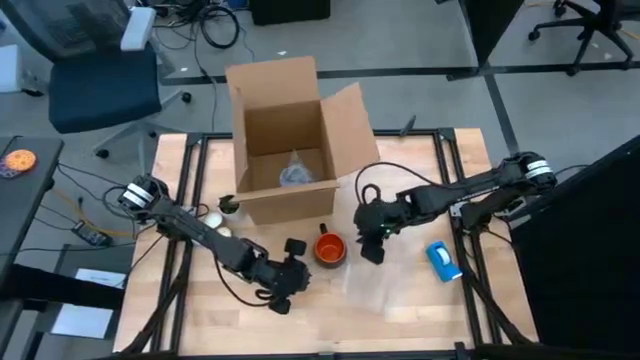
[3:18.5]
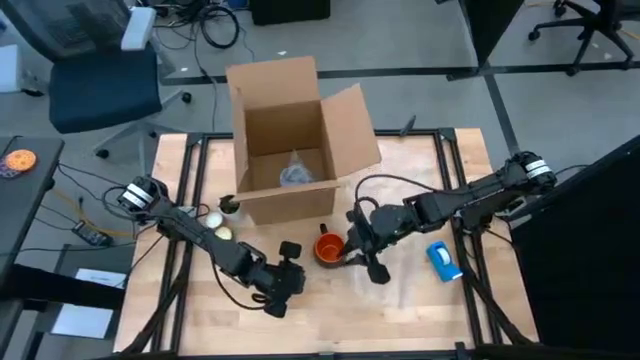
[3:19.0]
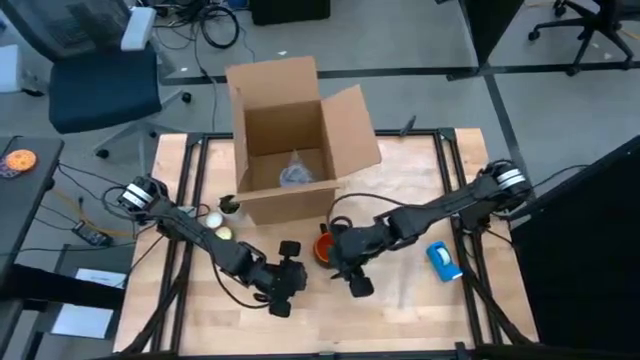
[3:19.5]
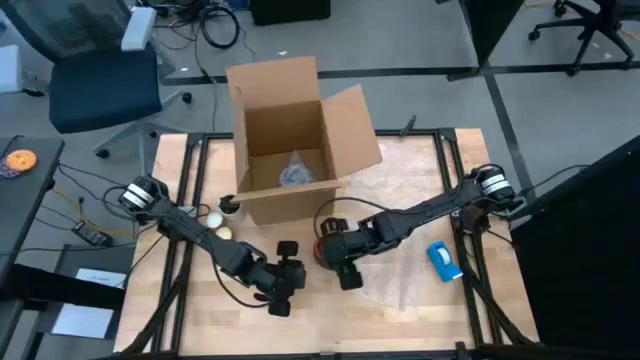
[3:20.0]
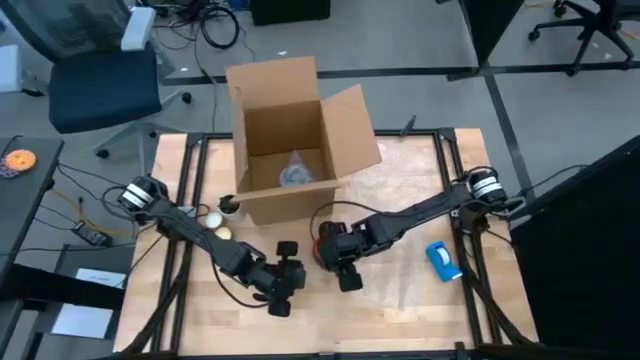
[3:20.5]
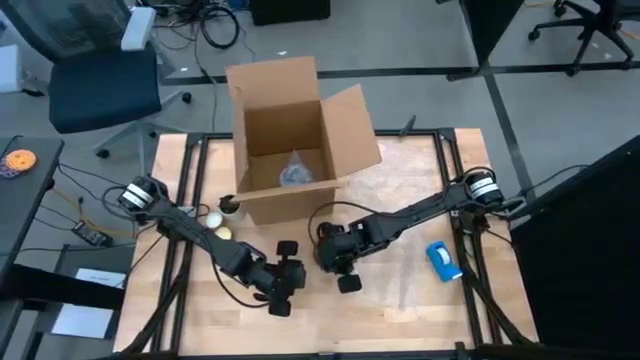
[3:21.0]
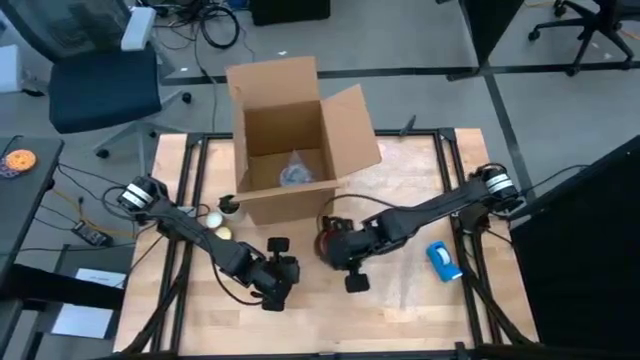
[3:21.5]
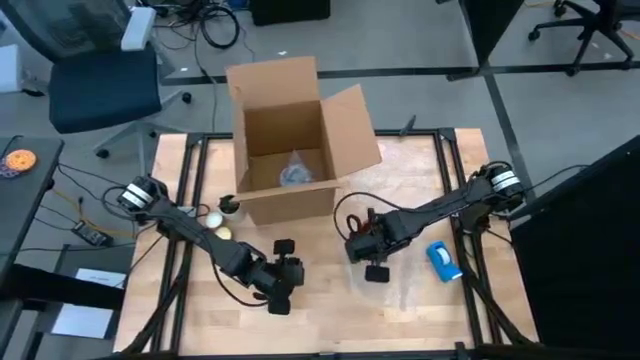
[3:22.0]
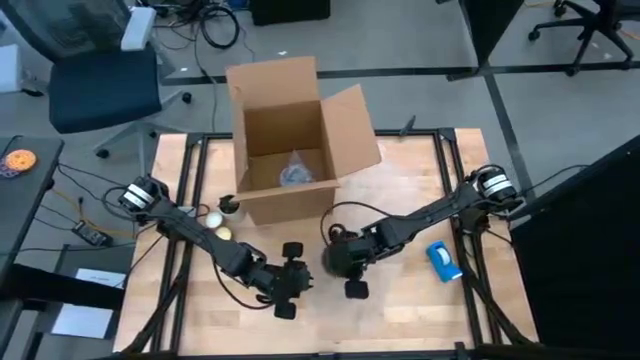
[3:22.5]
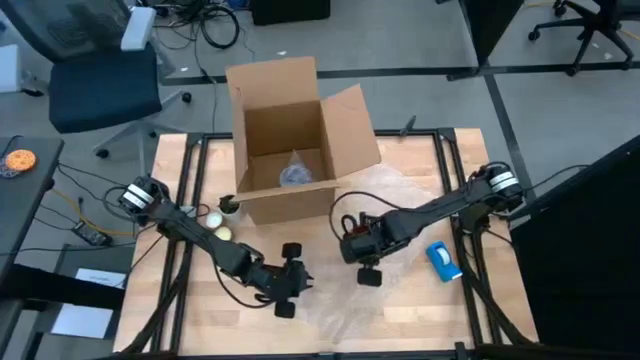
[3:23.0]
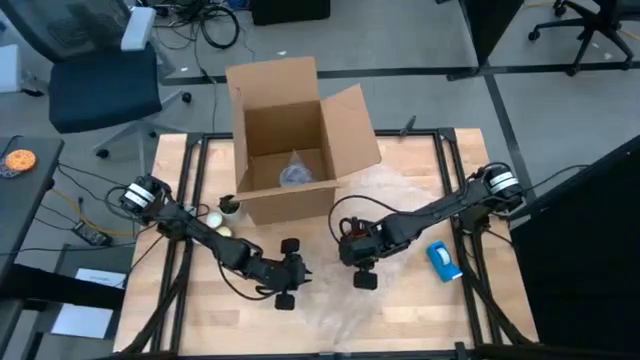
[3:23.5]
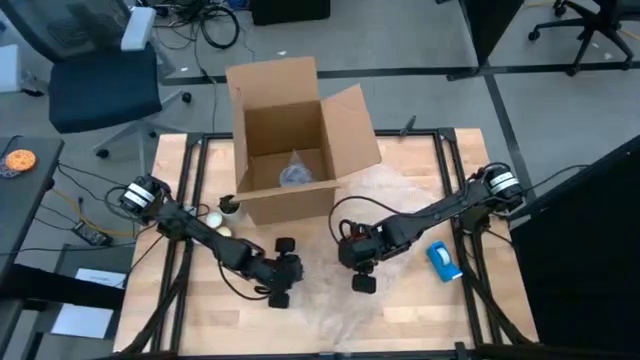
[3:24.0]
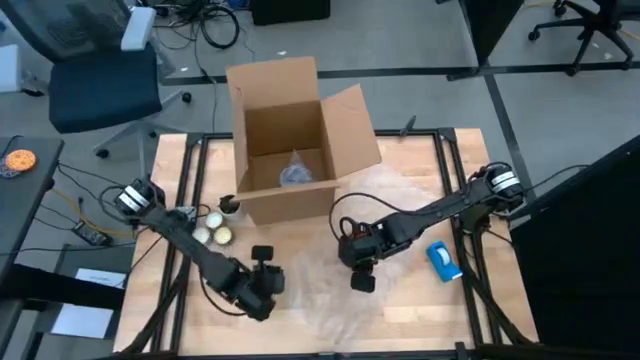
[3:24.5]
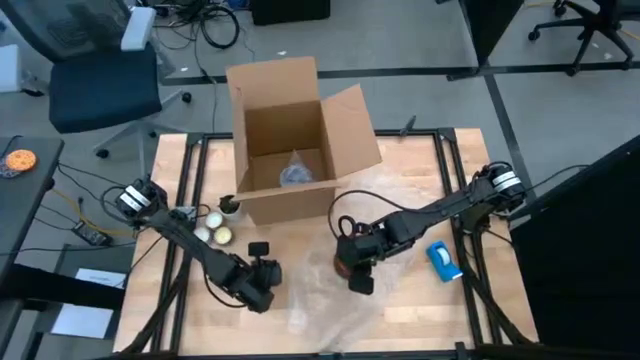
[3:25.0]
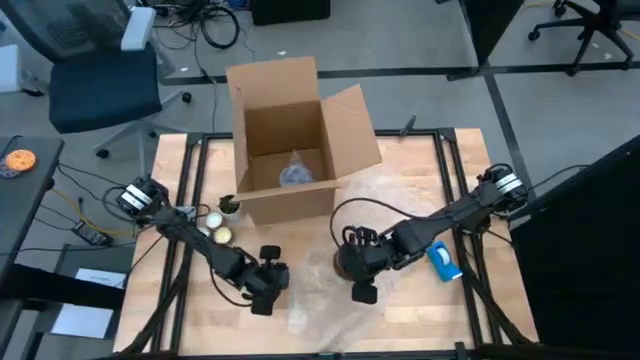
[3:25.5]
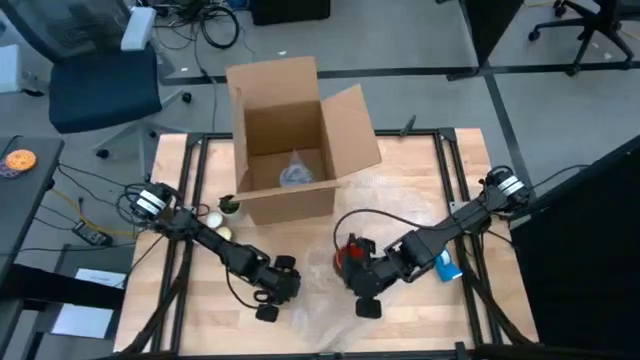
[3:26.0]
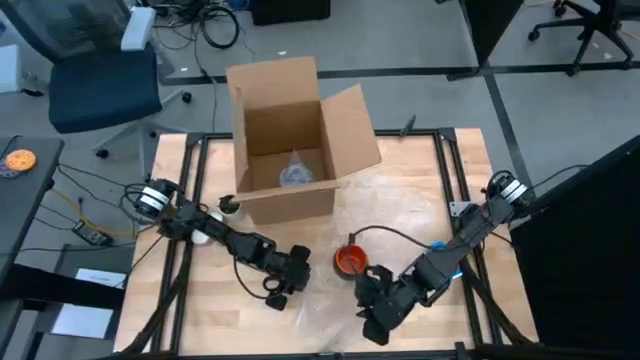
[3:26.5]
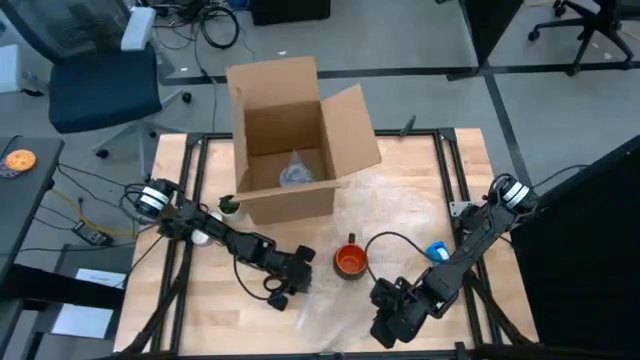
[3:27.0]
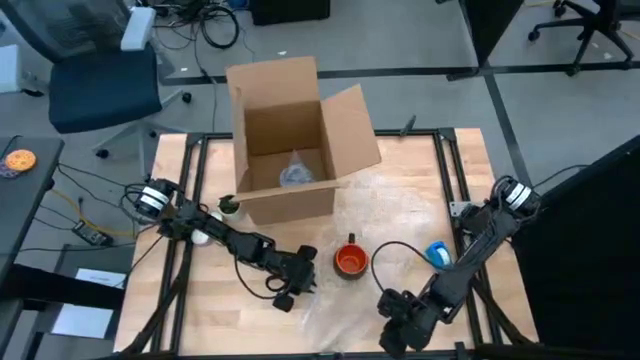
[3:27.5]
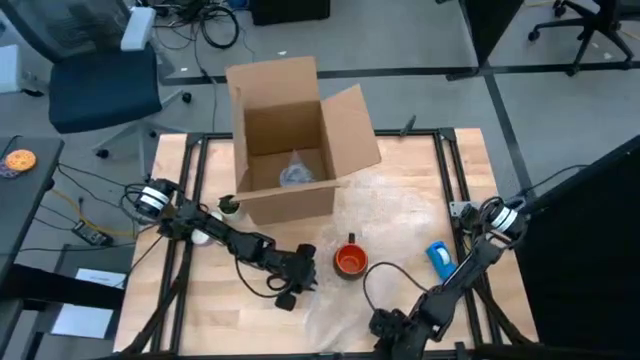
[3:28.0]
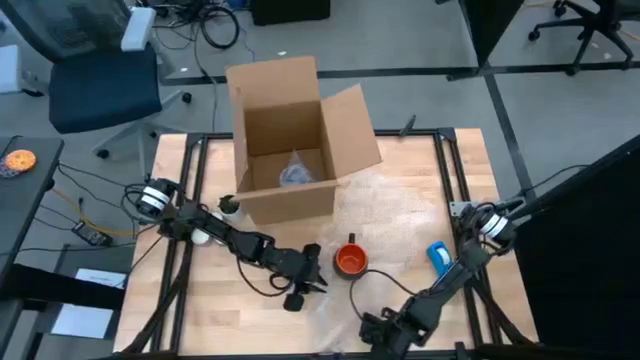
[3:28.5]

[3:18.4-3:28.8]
Task: wrap mug
Wrap the black mug with bubble wrap

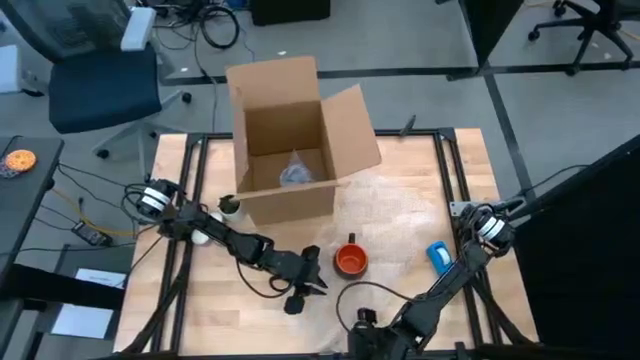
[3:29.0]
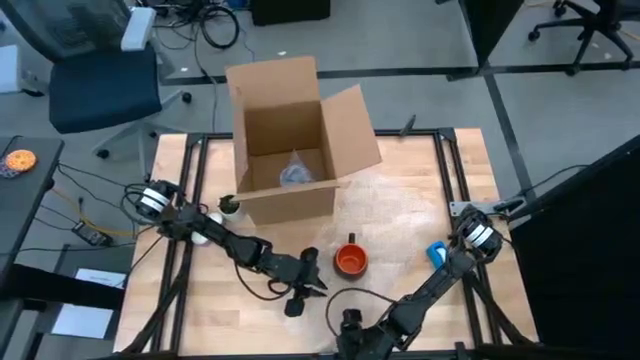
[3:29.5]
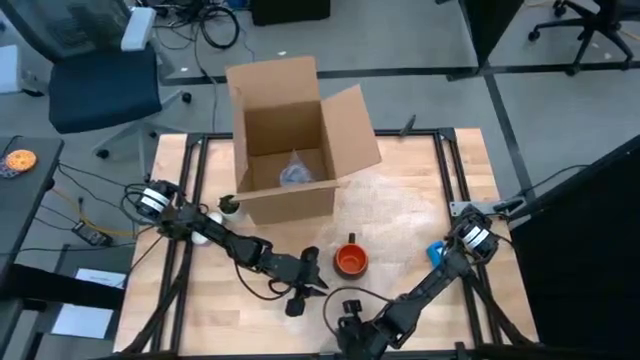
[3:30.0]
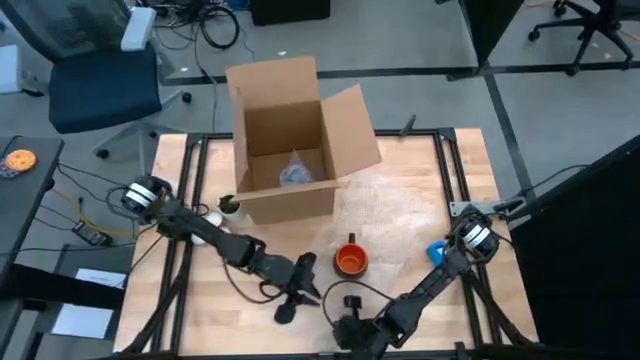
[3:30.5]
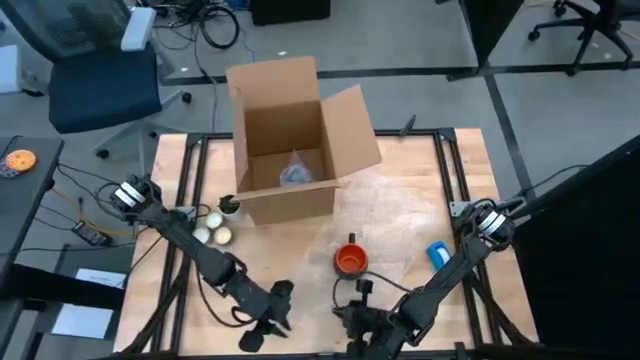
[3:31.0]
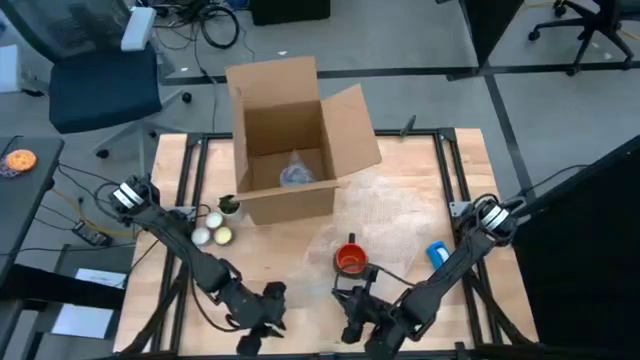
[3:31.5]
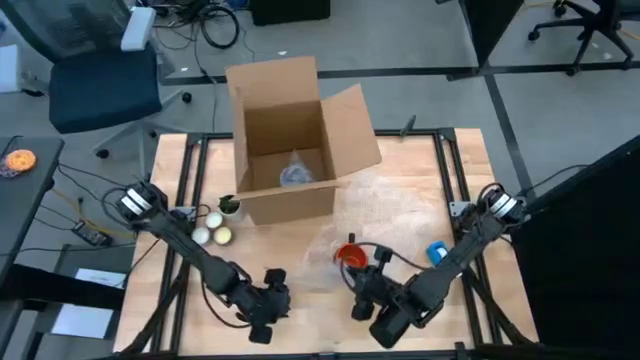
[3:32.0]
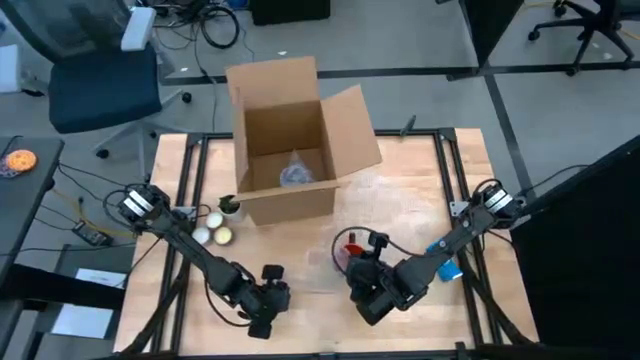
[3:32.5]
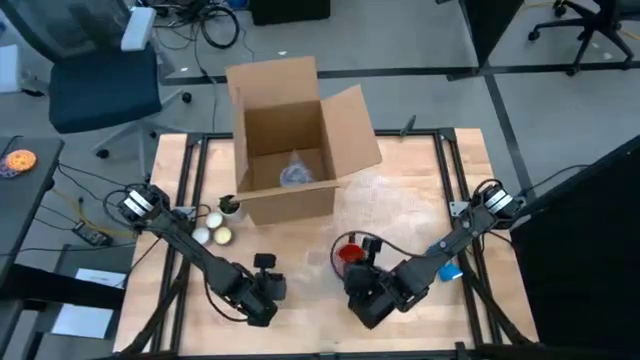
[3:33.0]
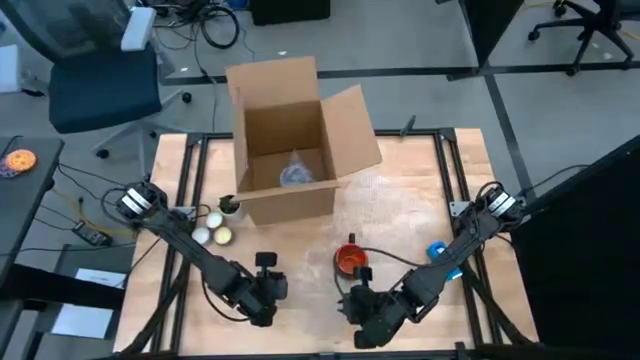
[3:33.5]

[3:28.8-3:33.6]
Wrap the black mug with bubble wrap

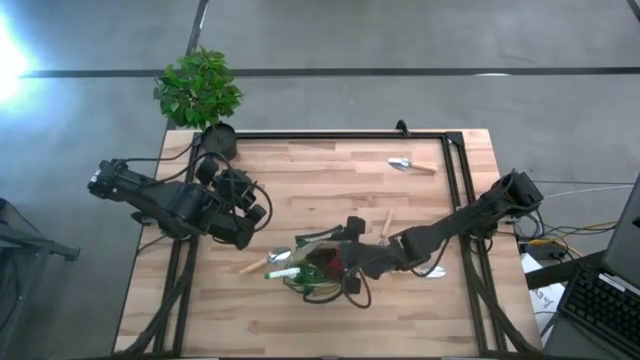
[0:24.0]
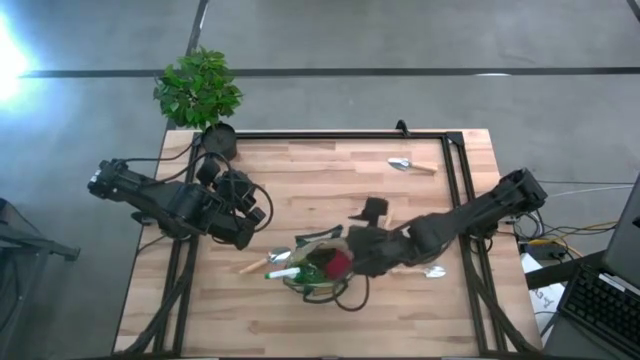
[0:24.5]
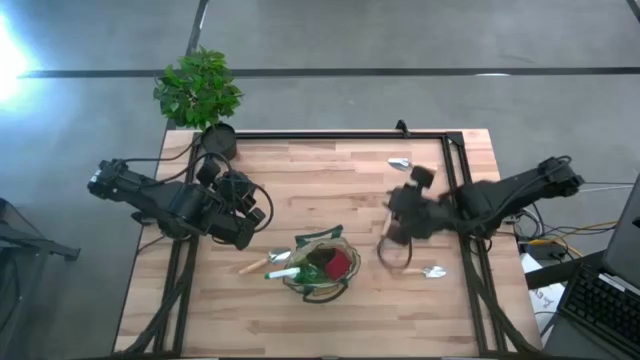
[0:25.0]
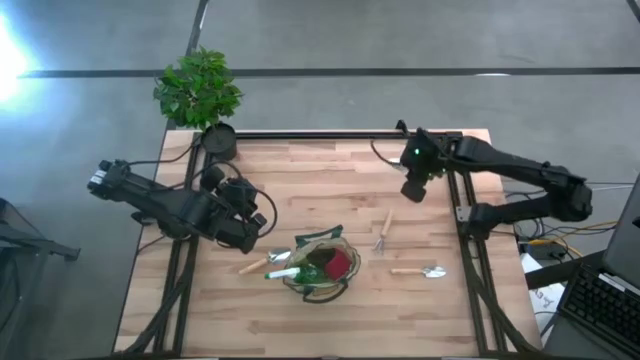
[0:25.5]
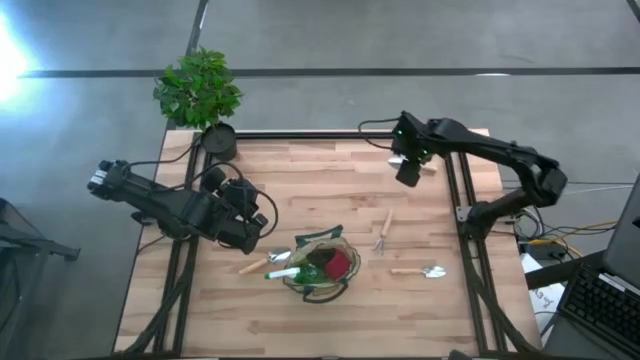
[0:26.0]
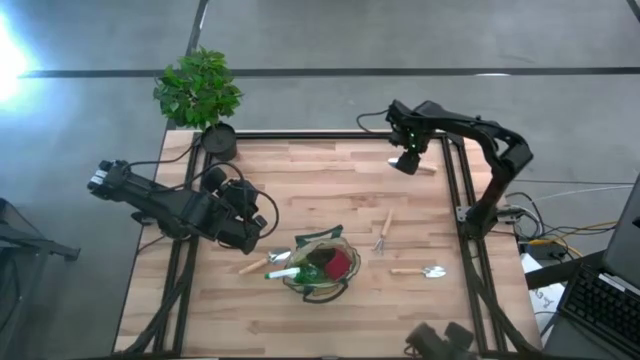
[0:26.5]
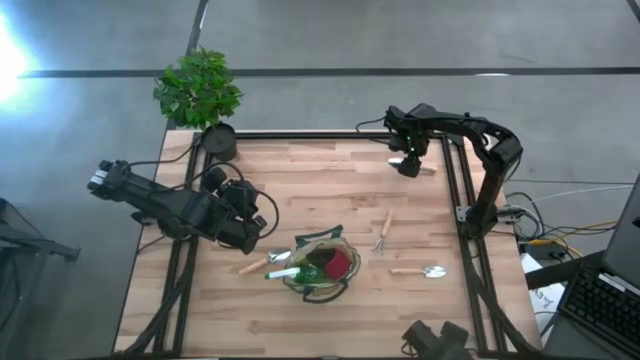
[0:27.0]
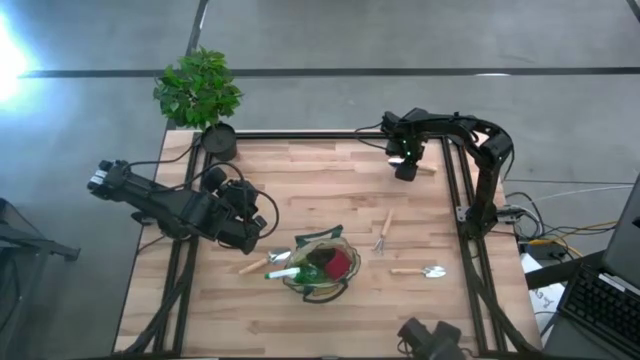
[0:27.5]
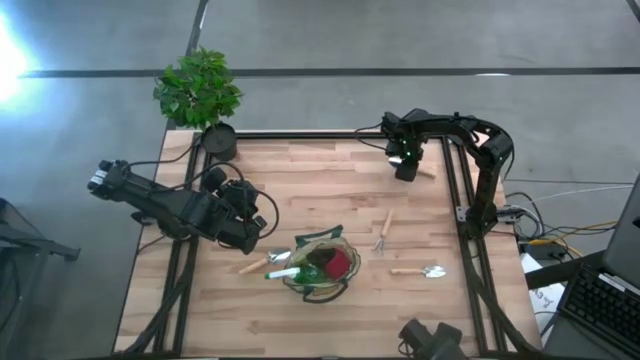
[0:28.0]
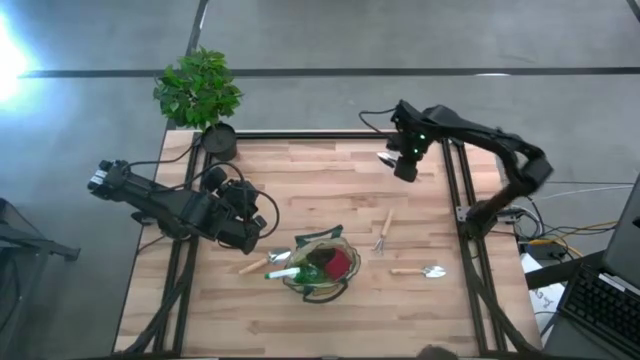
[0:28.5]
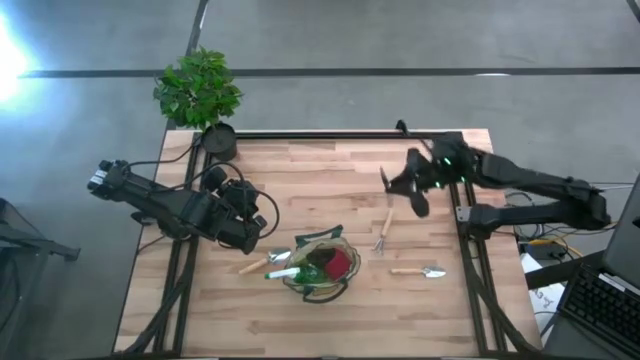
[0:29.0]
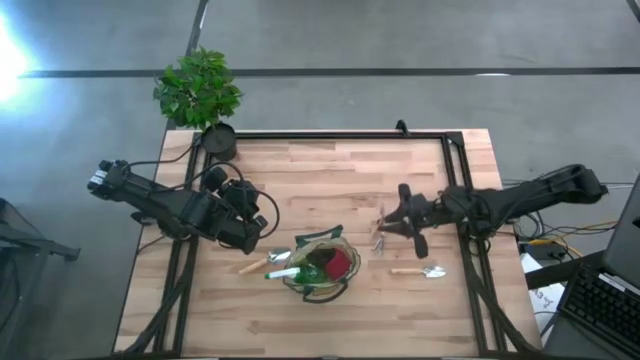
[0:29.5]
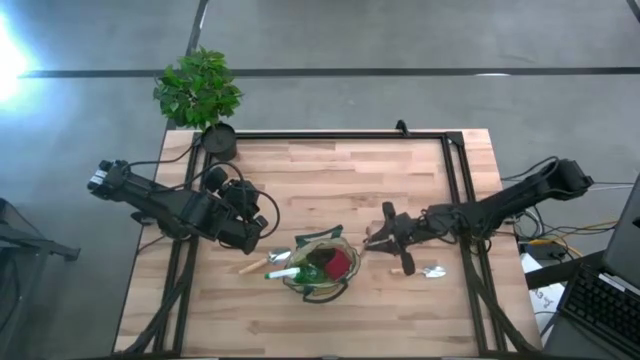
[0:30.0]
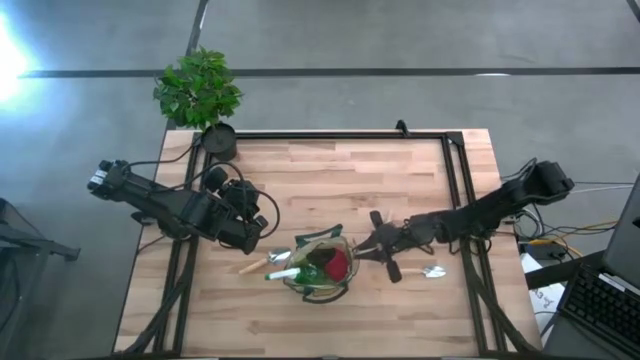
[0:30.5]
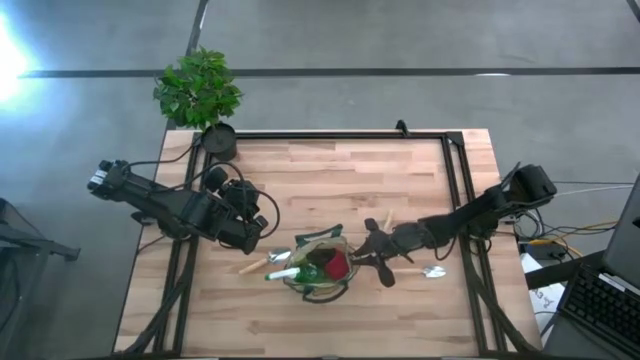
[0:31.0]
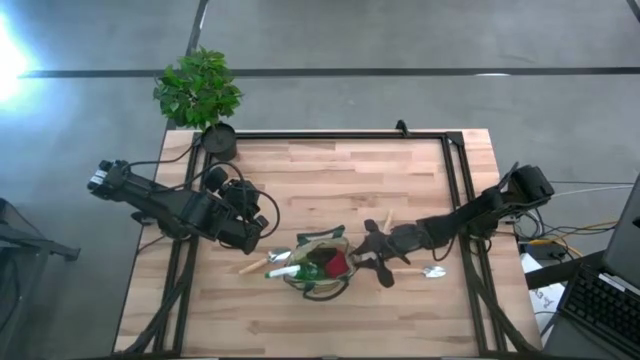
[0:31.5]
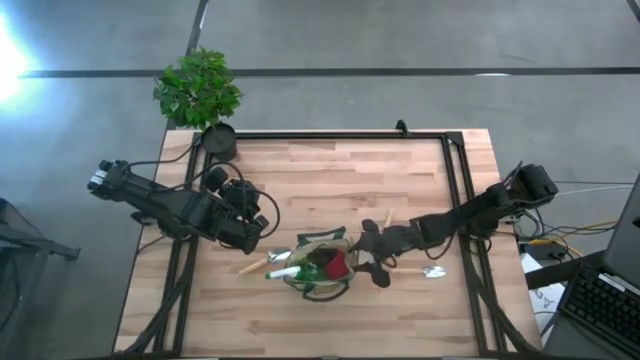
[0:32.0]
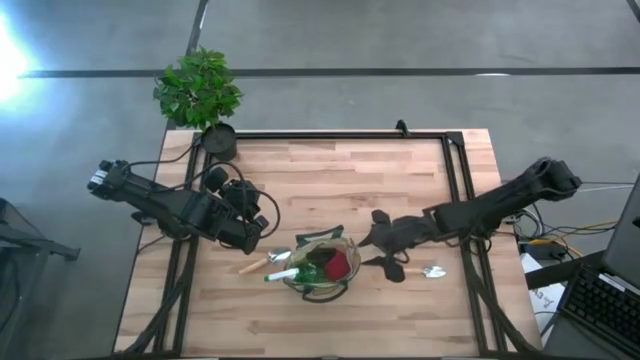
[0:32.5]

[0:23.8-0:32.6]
Task: Pick & Place Garden tools in Gardening bag
Put the top trowel into the gardening bag
